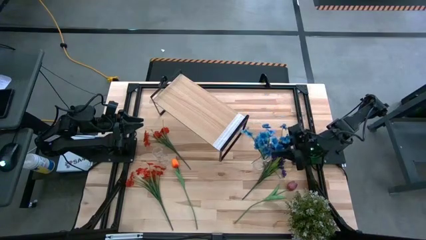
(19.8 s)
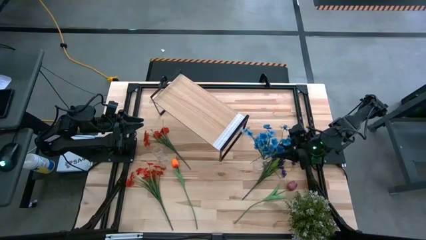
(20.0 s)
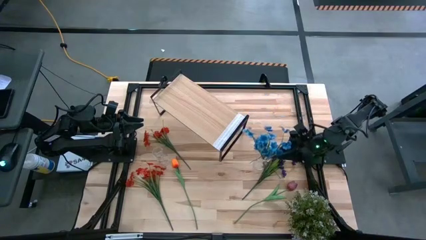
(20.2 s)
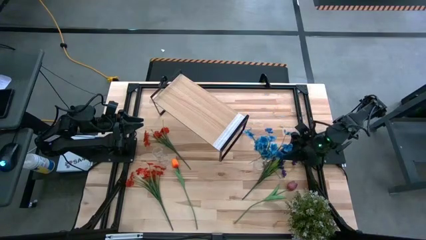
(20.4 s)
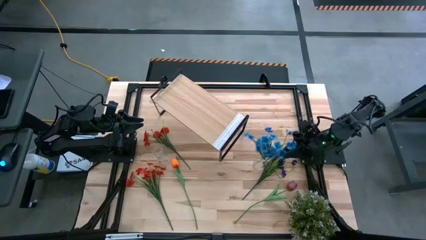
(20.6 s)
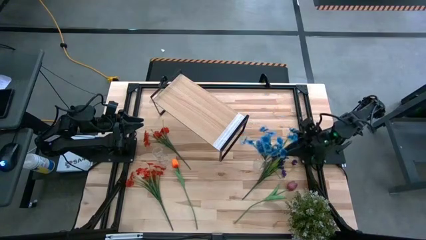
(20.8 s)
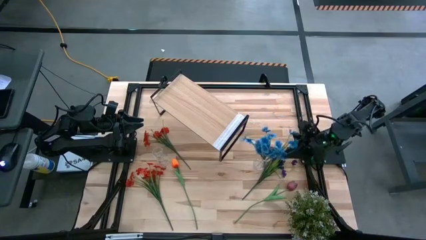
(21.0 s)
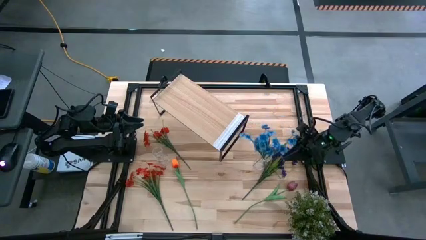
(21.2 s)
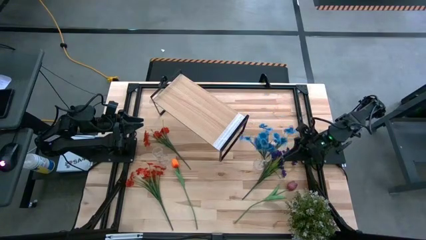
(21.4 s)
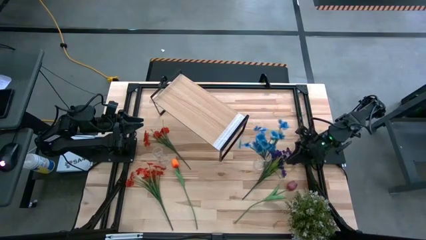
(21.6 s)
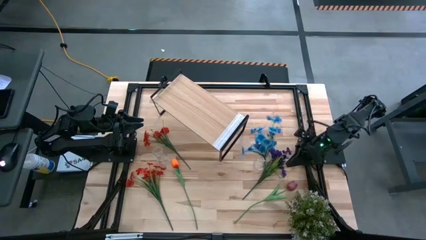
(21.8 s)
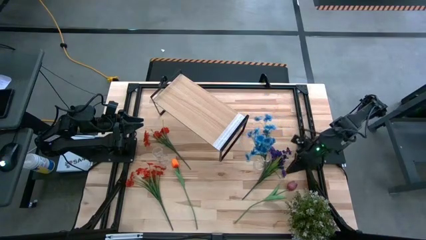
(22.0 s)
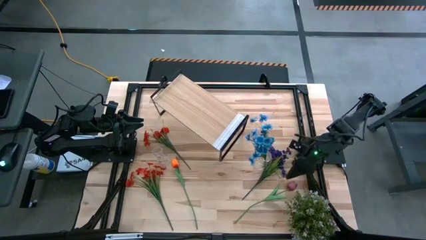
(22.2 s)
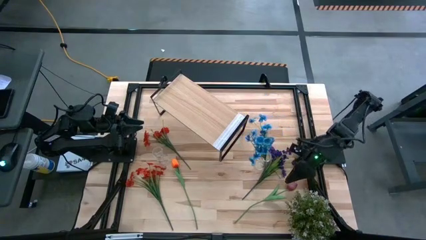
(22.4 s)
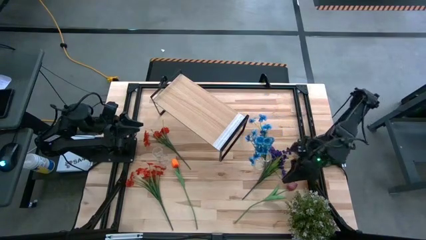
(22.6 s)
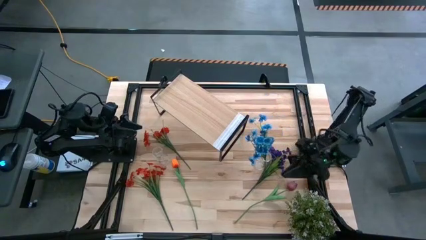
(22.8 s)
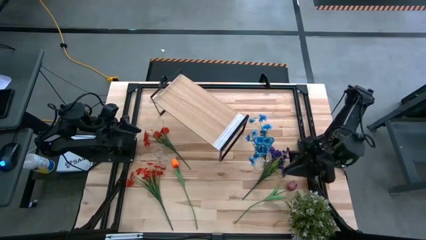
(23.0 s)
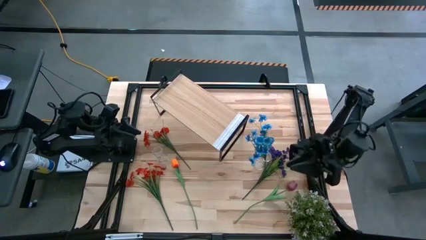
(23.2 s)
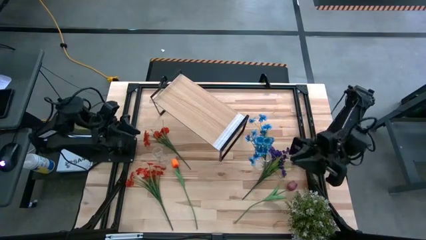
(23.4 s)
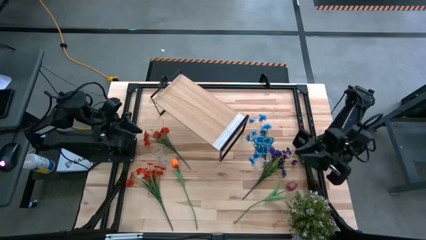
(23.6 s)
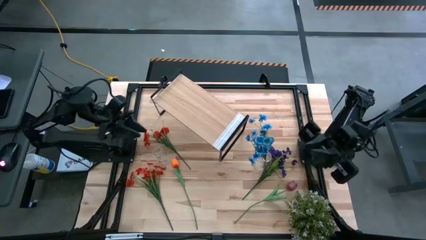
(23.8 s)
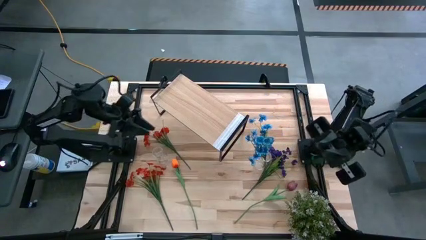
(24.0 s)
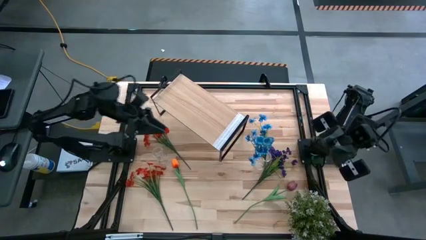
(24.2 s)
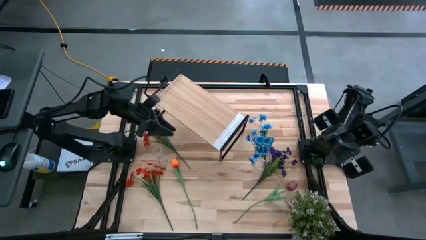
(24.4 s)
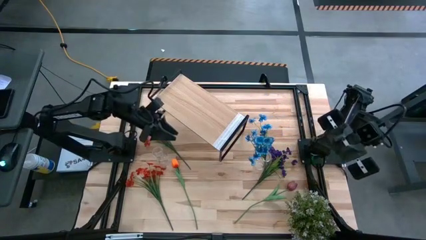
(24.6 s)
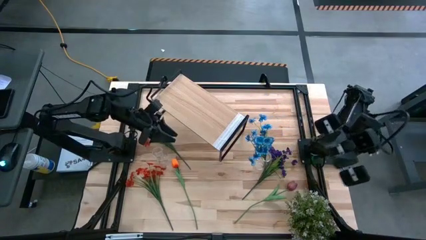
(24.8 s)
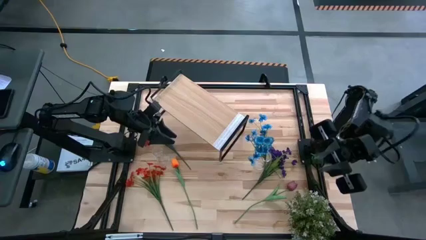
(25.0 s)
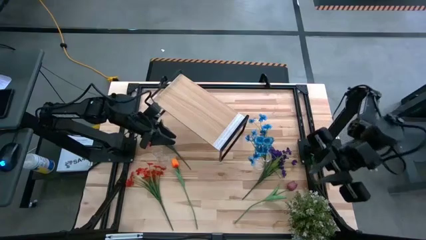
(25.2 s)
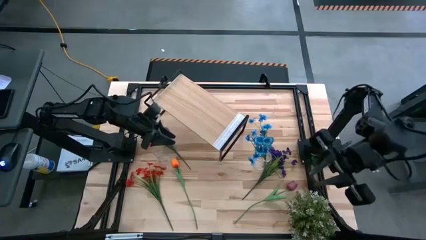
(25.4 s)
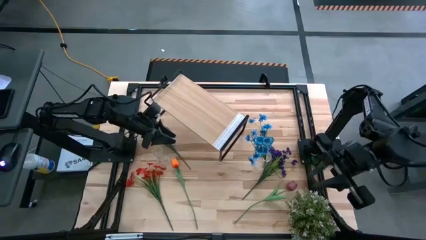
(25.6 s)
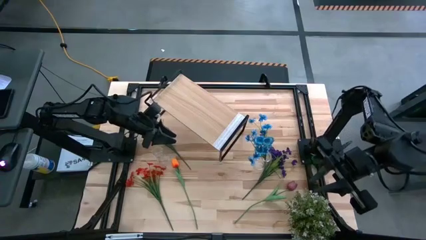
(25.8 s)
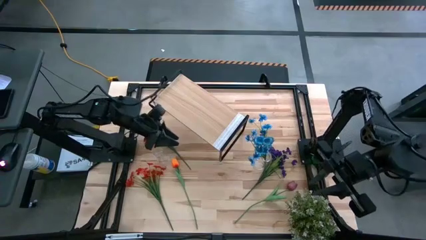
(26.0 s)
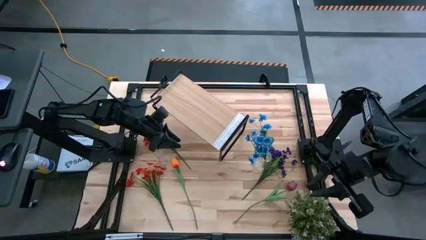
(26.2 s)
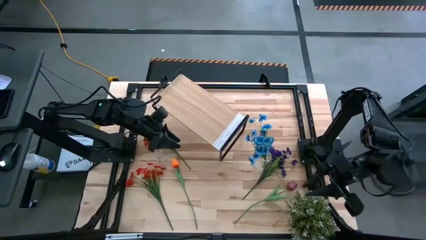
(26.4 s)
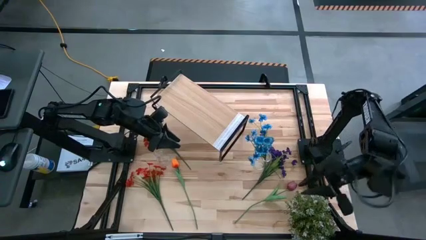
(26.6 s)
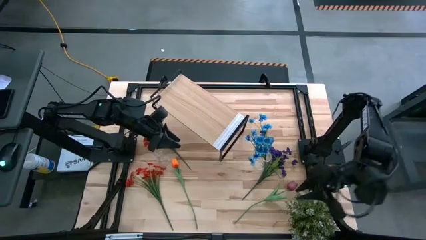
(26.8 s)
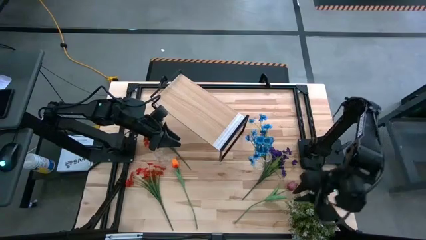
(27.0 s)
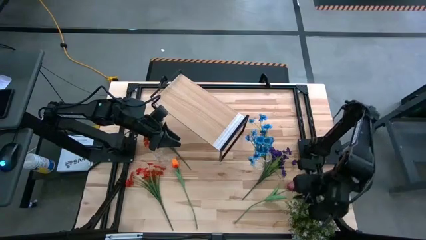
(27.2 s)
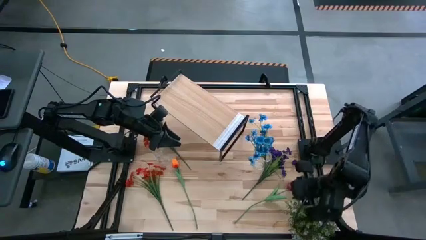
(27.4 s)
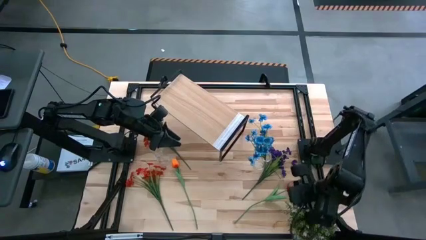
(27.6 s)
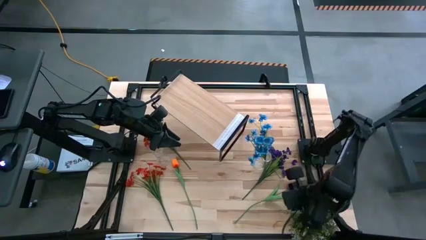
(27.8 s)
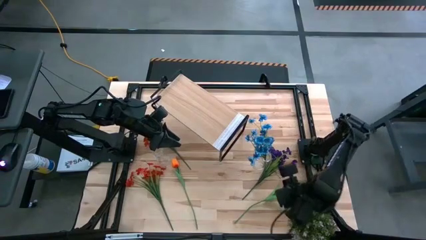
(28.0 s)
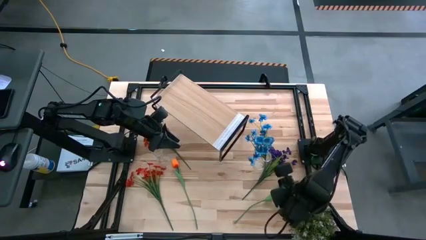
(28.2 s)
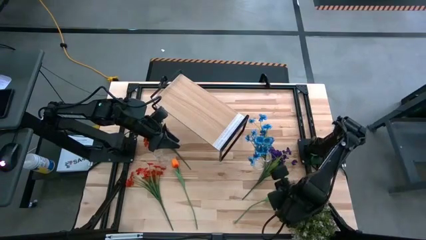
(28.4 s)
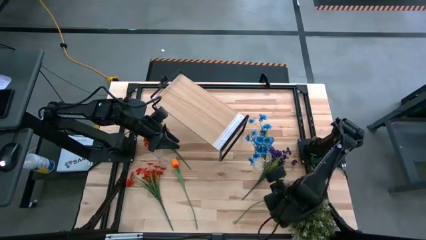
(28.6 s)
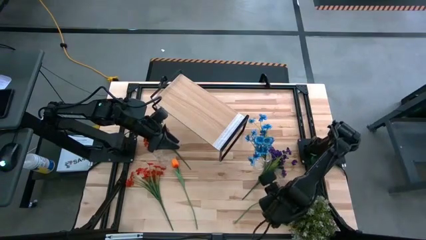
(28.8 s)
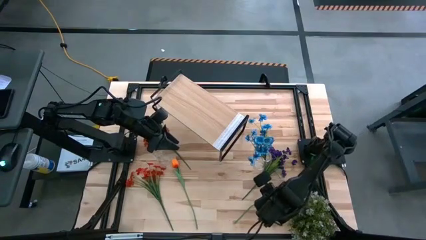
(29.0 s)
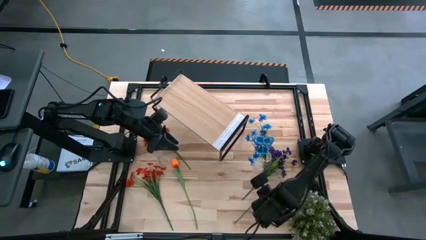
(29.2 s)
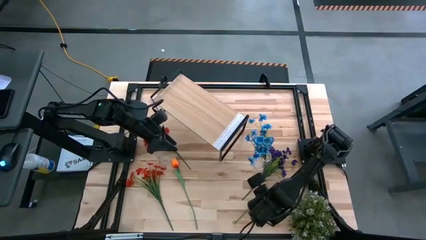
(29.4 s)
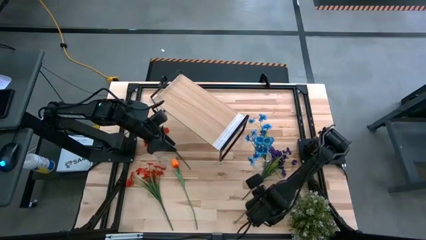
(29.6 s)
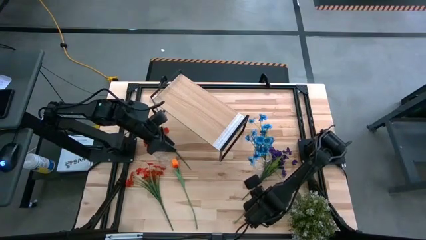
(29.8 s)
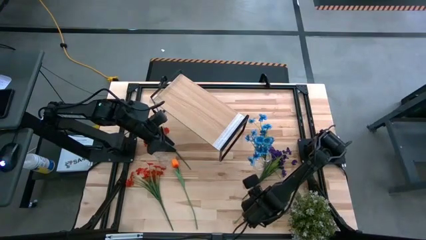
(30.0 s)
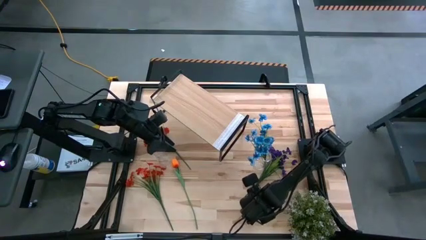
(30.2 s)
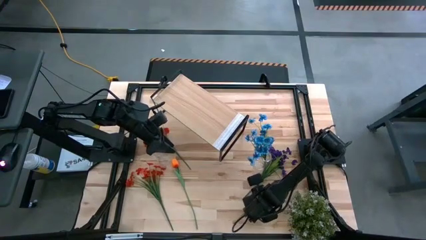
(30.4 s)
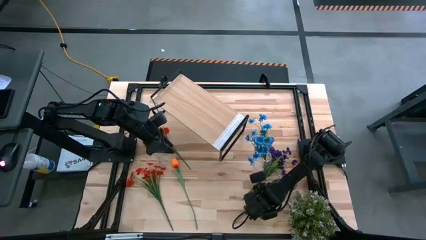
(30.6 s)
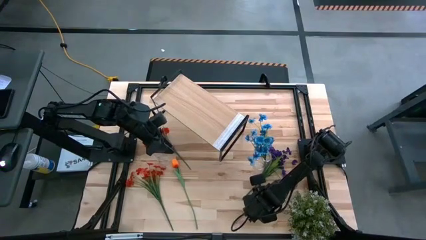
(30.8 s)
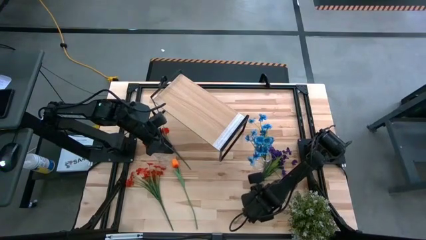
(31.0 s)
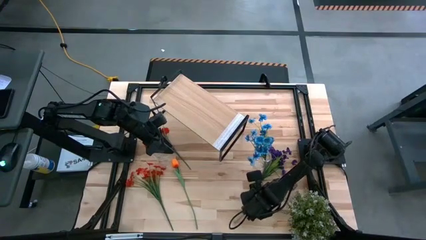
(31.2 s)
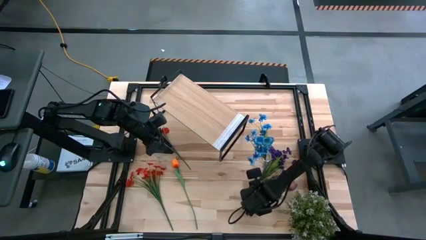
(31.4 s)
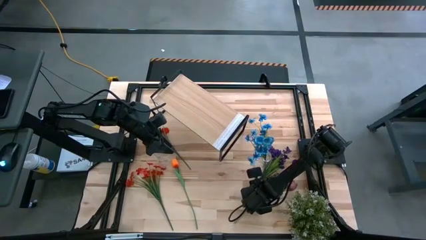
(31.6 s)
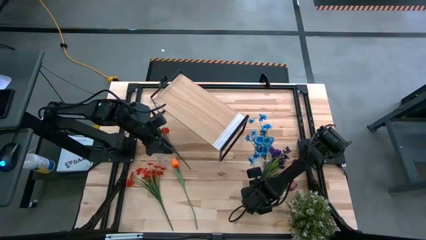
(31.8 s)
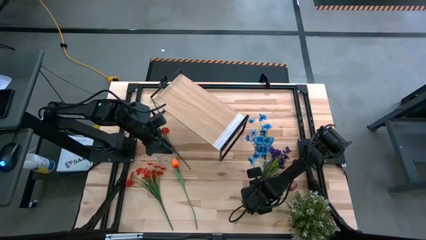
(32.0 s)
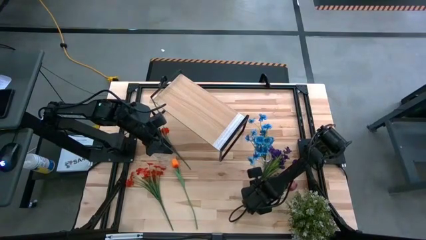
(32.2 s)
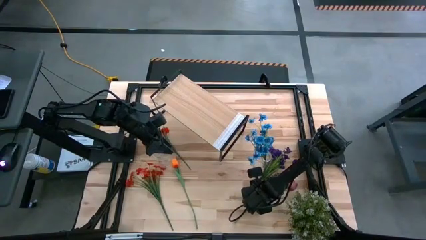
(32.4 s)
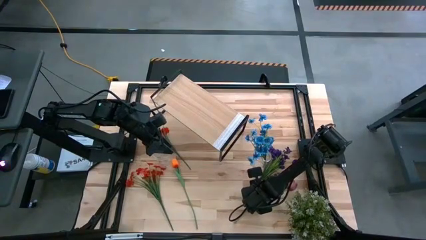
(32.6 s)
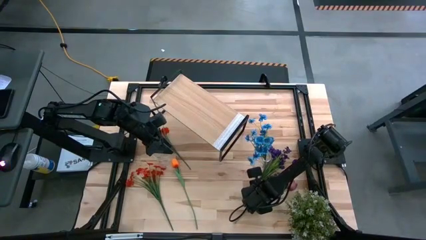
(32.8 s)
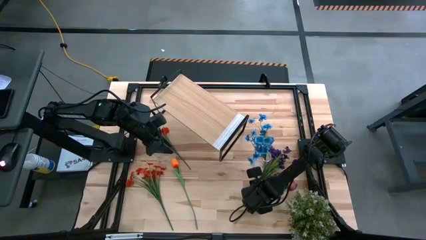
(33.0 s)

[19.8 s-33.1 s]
Task: Pick and place flowers into a vace then onto a shelf
Put the purple flower into the right transparent vase

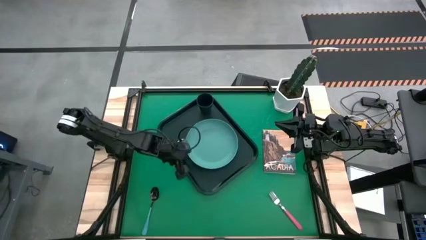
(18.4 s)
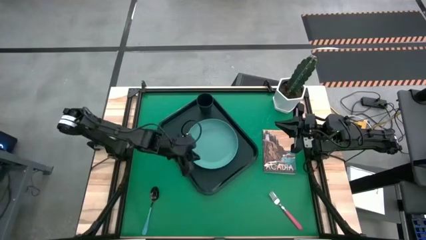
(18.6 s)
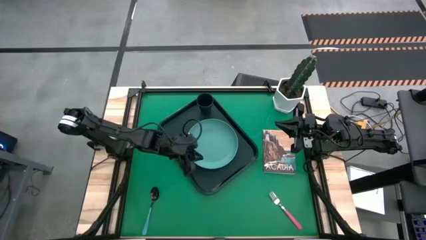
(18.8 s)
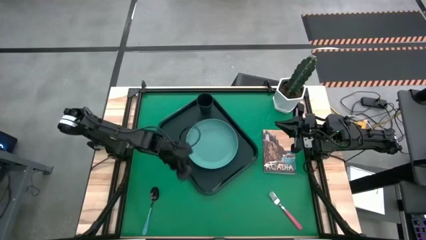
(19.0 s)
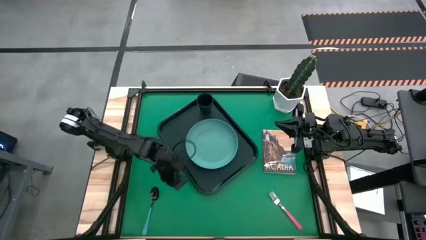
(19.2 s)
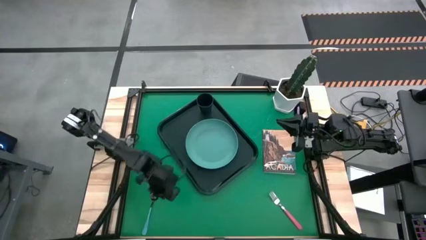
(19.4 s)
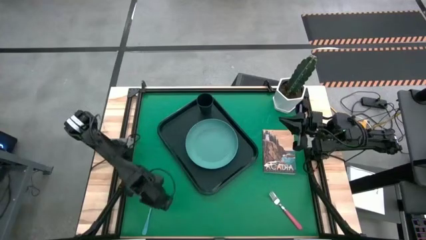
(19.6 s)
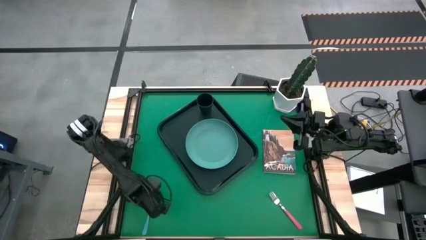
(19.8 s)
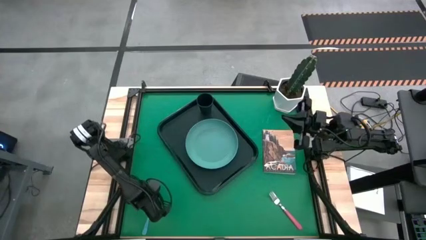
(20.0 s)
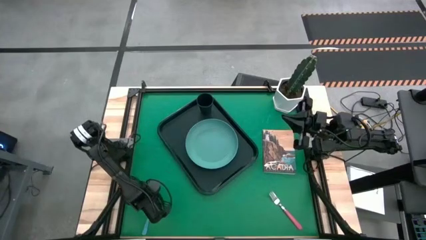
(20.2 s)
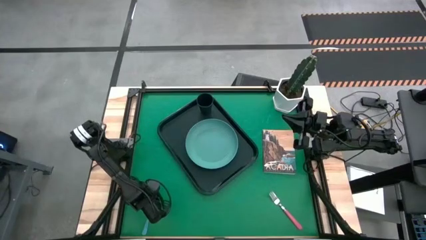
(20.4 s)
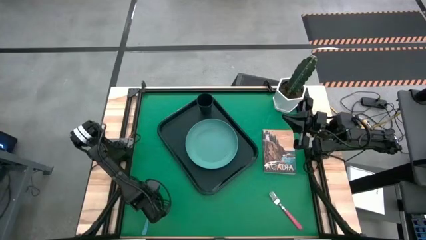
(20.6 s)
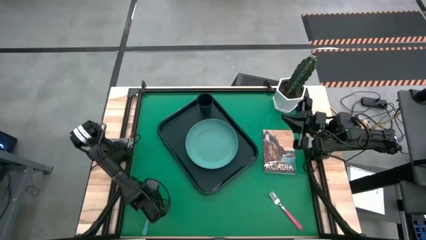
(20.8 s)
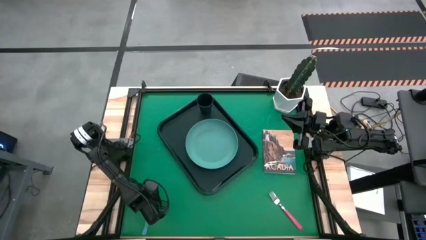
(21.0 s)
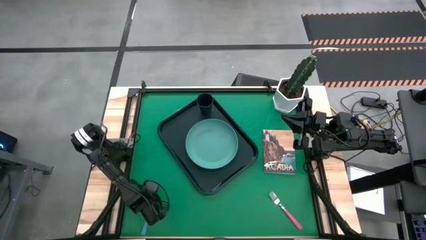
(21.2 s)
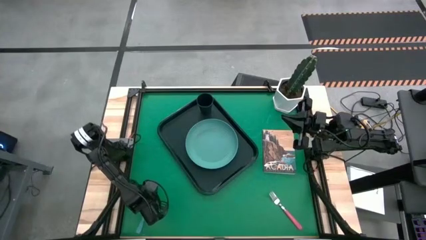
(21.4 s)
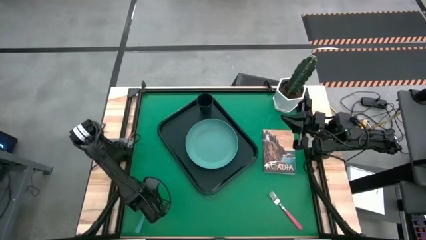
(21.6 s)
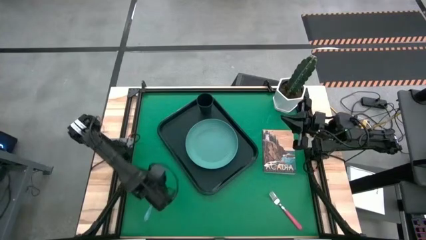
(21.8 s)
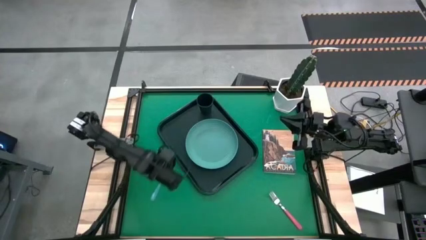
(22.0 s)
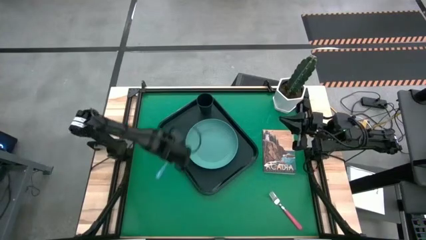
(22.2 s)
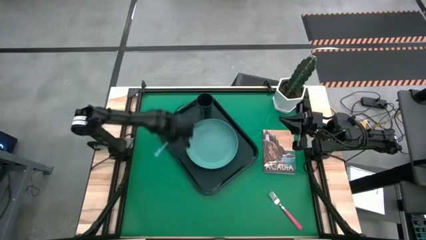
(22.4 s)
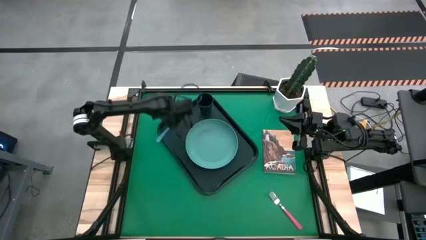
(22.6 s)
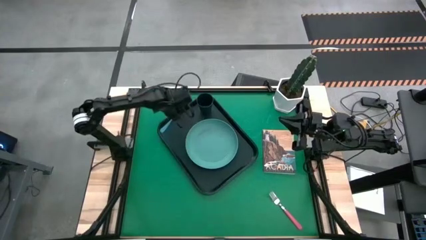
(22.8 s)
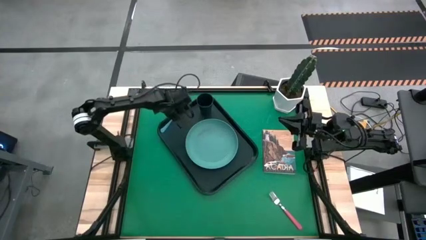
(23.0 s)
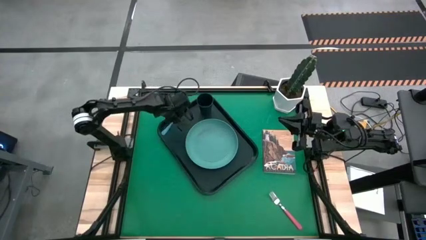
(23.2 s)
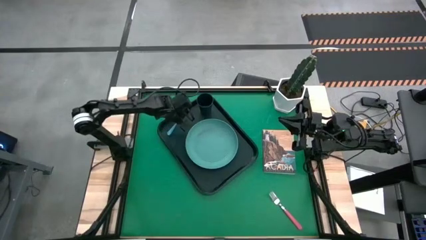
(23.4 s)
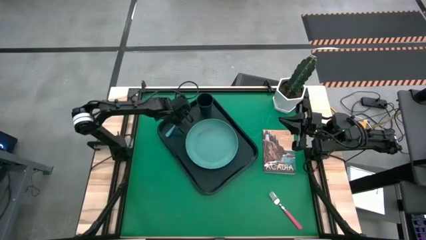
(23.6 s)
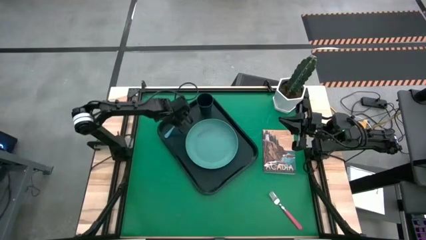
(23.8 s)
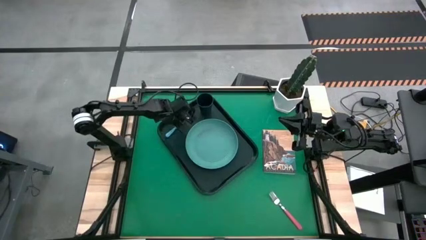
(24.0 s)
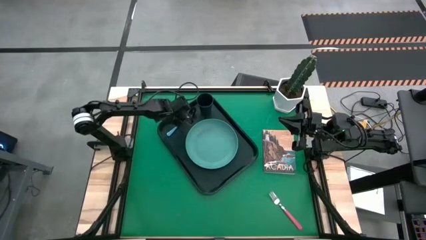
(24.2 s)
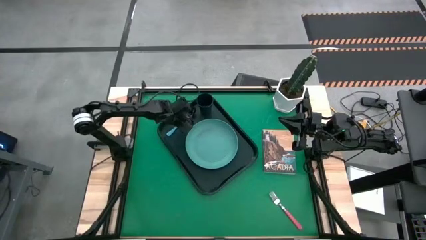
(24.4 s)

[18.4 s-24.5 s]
Task: Pick and place plate/cup/fork/spoon on tray
Put the blue spoon on the black serving tray to the left of the blue plate
